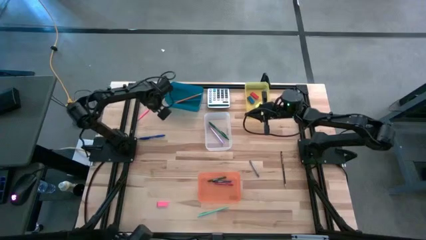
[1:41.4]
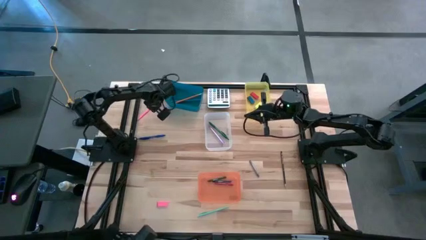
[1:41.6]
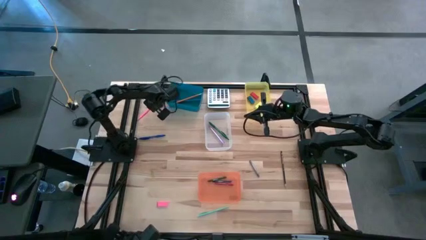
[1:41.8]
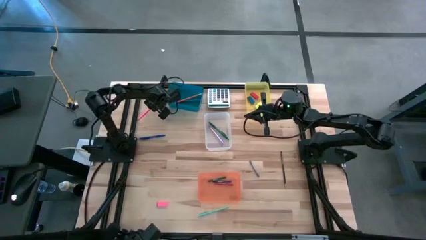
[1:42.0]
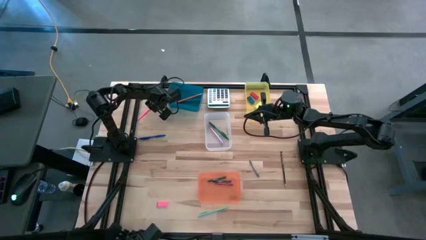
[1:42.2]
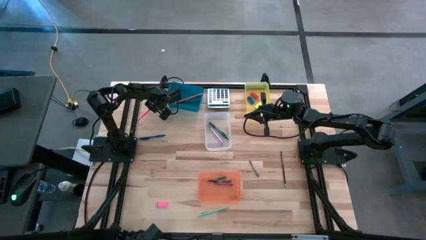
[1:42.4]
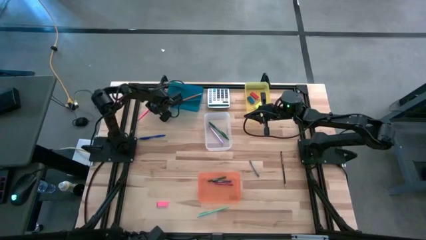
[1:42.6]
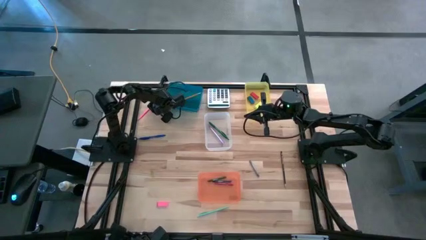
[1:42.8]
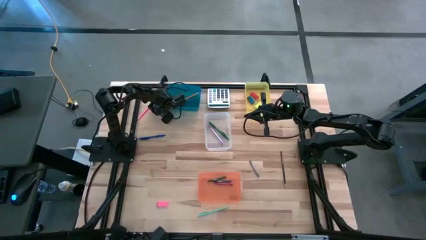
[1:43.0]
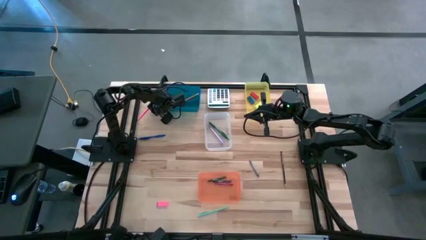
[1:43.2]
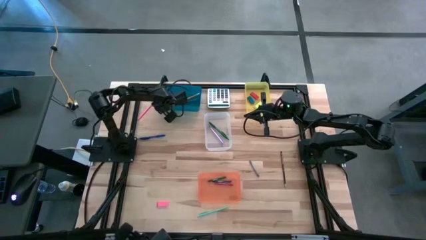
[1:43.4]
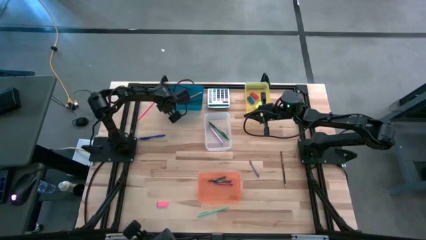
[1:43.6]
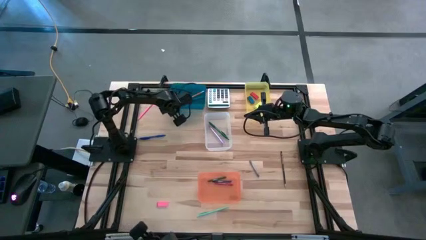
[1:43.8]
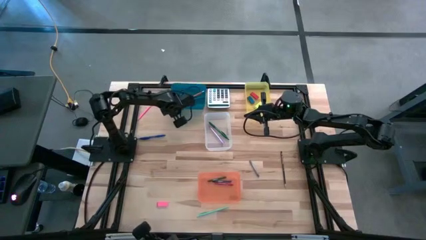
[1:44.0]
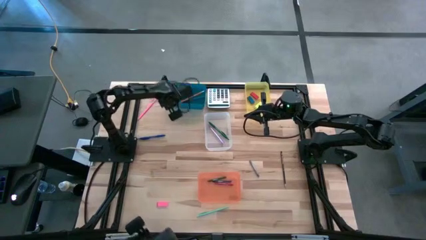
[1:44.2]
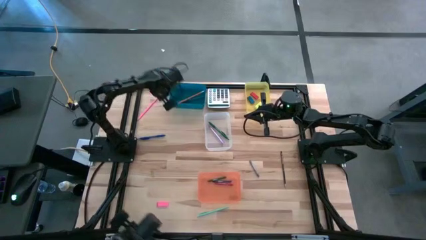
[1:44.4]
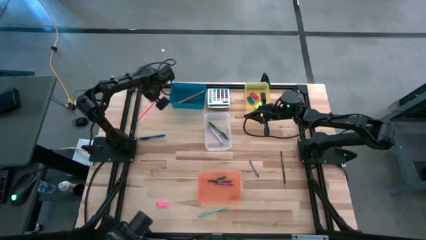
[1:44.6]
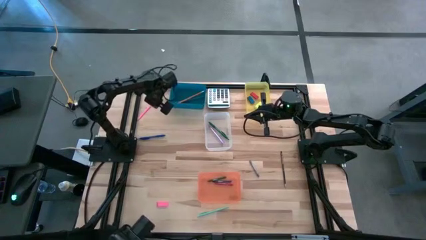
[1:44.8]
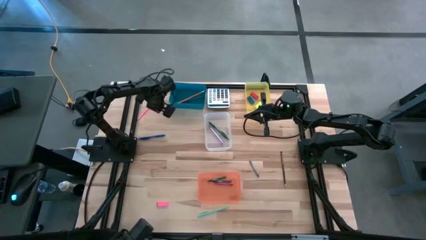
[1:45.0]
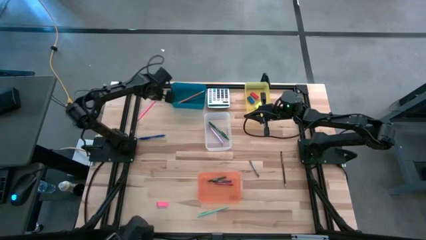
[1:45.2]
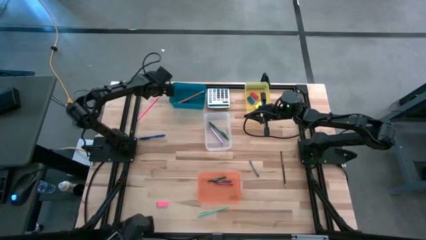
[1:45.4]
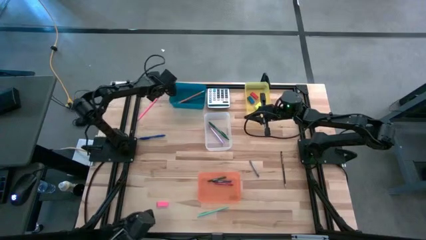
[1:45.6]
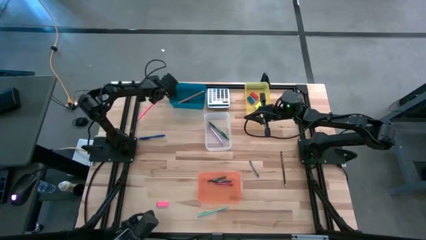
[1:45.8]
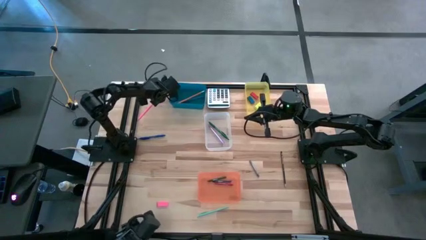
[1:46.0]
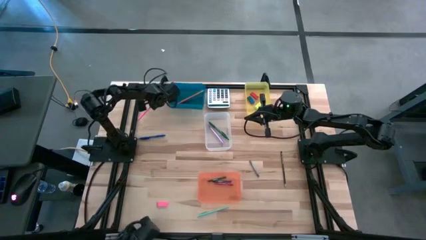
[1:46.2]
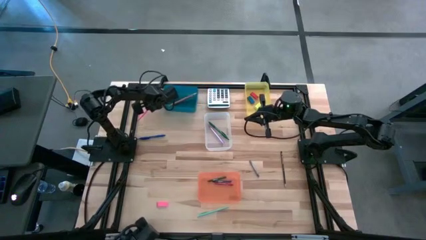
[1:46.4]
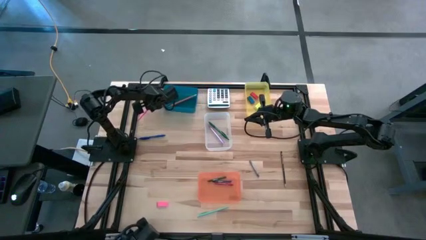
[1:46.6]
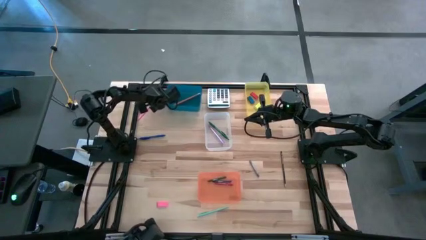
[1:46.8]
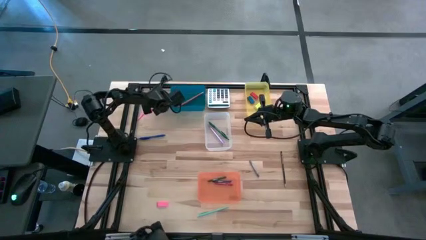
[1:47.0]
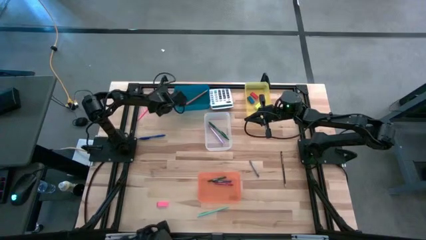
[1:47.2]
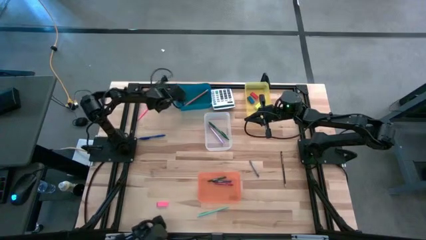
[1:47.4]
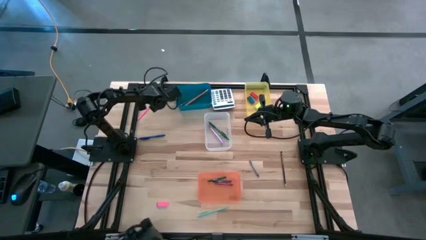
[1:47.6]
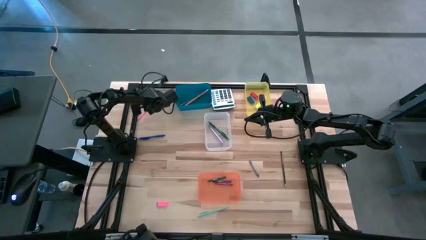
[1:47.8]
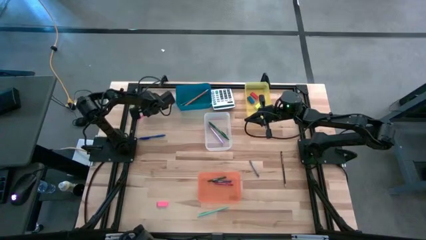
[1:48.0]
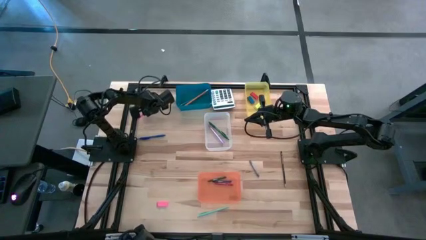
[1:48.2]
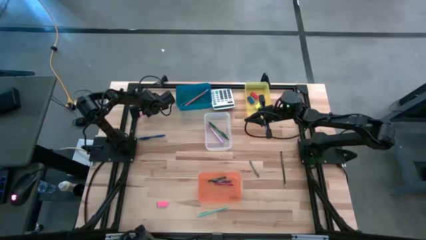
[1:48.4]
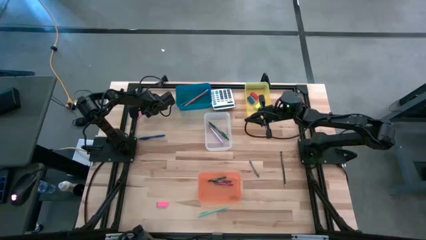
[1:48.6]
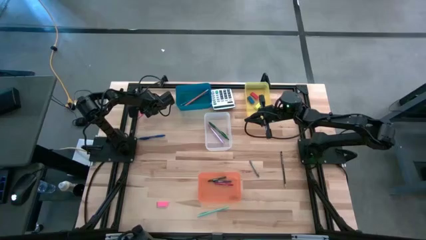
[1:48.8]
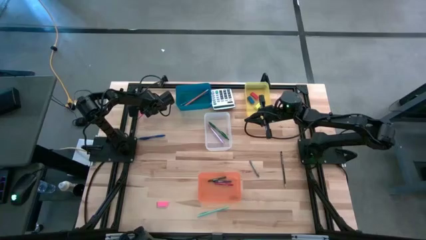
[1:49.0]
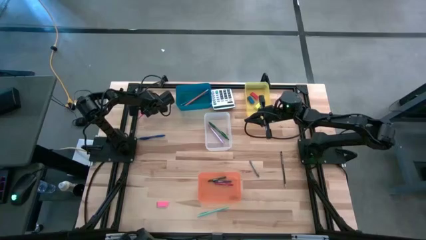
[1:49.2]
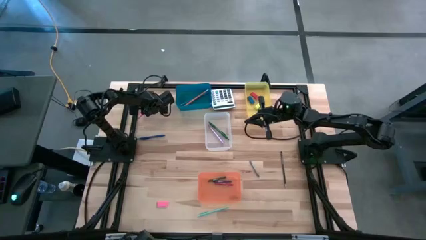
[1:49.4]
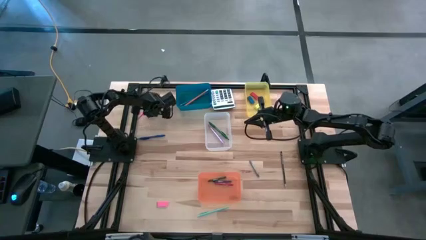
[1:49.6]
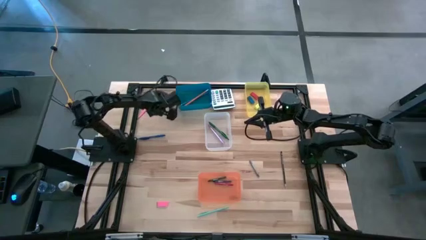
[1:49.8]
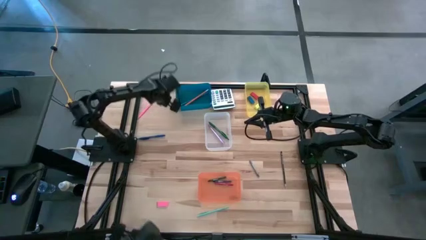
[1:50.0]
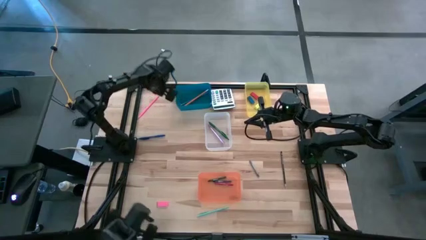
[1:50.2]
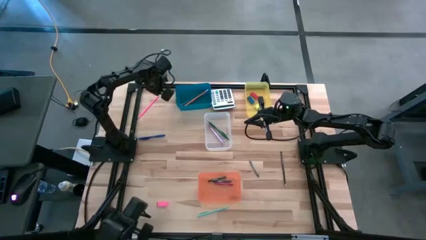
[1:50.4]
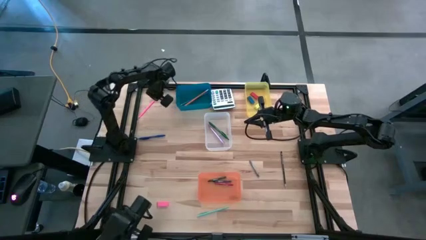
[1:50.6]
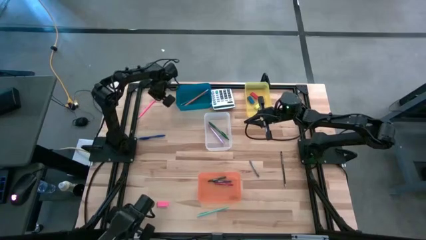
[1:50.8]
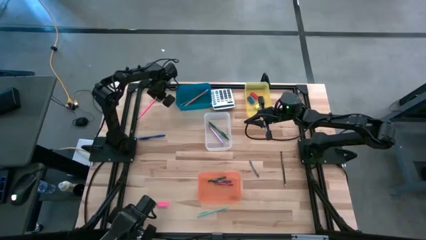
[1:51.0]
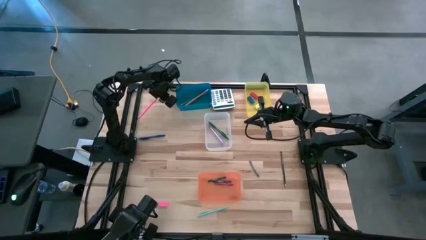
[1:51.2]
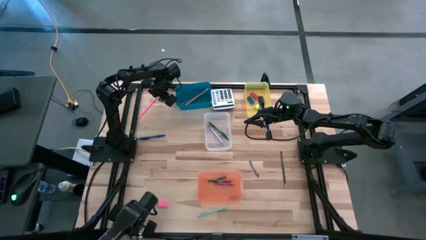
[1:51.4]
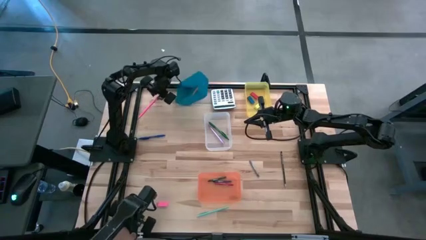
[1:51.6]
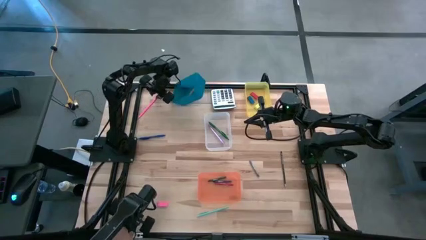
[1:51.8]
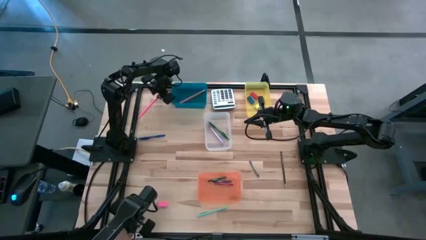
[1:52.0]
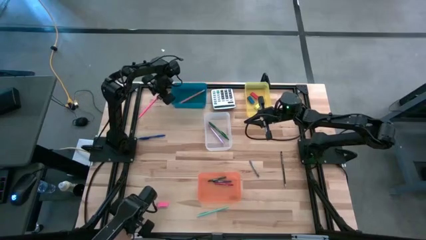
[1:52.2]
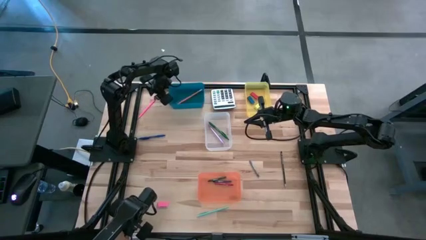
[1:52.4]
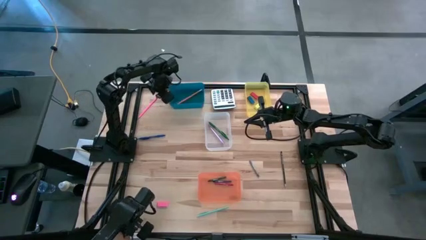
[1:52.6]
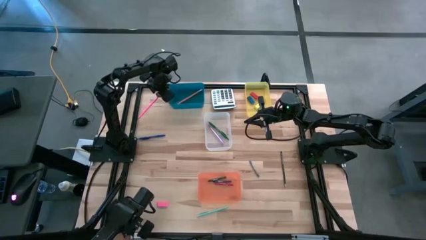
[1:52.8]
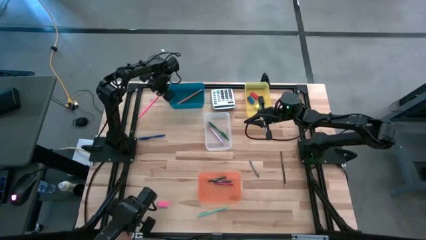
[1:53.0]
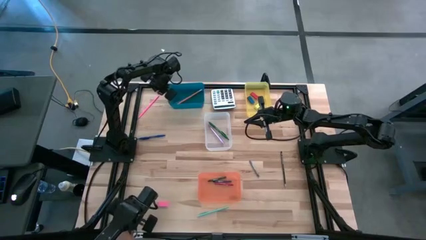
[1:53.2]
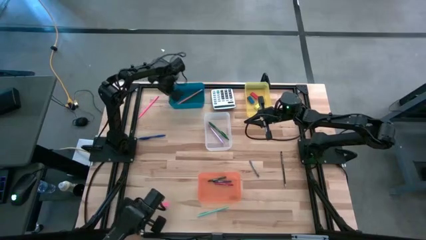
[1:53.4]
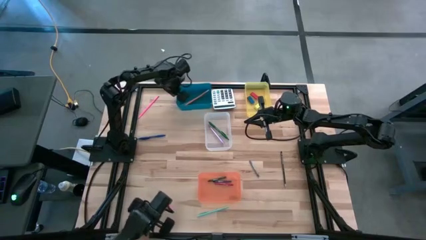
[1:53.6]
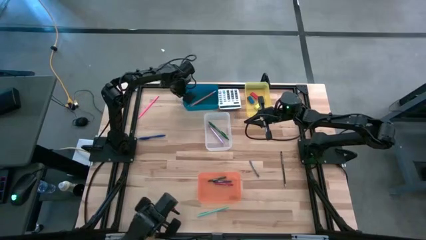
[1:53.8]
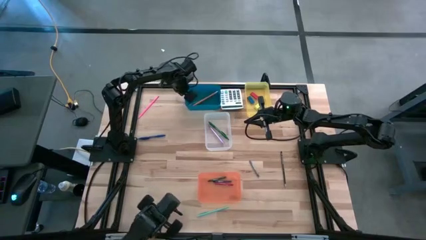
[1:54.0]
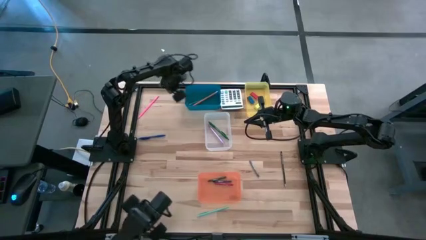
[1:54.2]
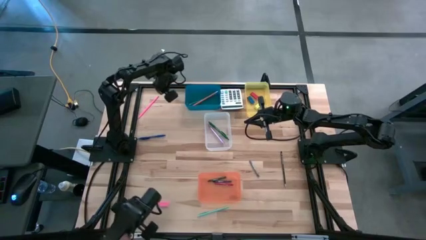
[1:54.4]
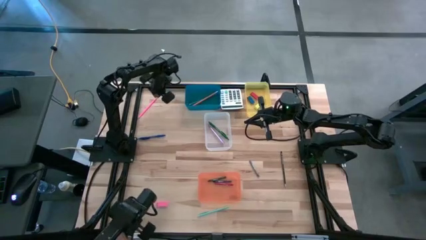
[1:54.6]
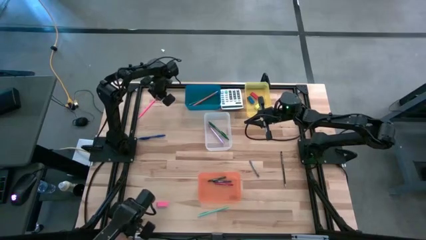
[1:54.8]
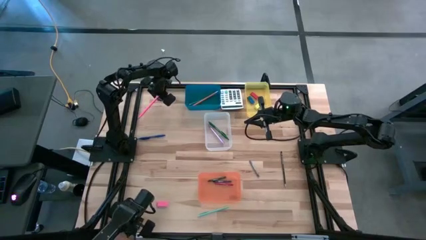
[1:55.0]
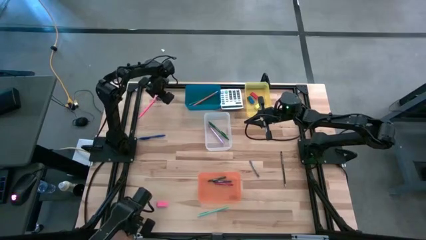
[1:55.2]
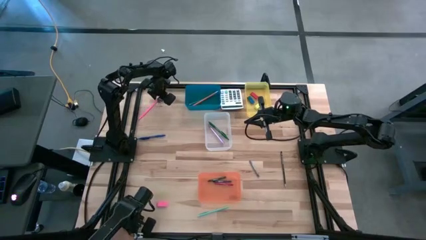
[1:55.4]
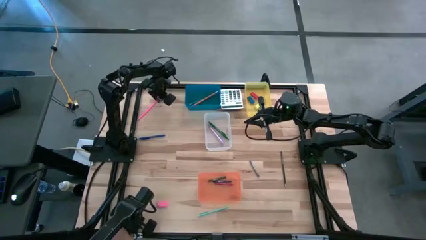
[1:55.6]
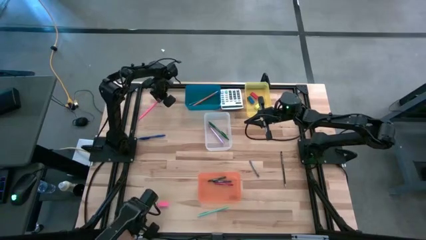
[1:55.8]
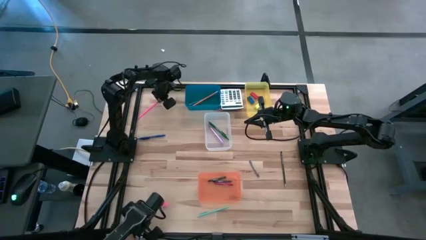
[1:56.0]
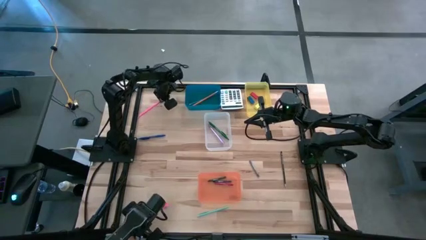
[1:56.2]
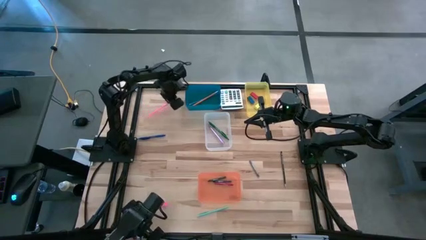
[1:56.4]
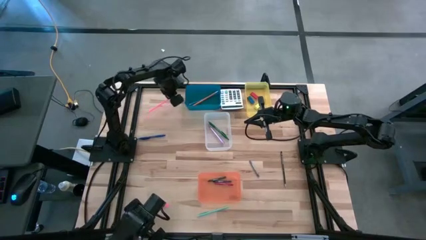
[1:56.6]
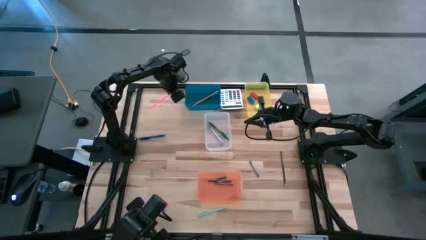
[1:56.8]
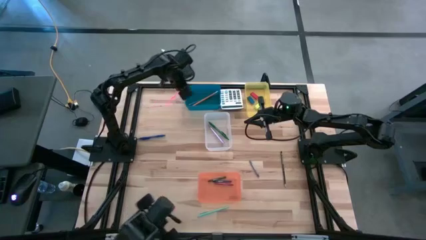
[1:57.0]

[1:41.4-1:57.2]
Task: Sort crayons/erasers/pens/pencils in bins
Put the pink pencil into the blue bin
